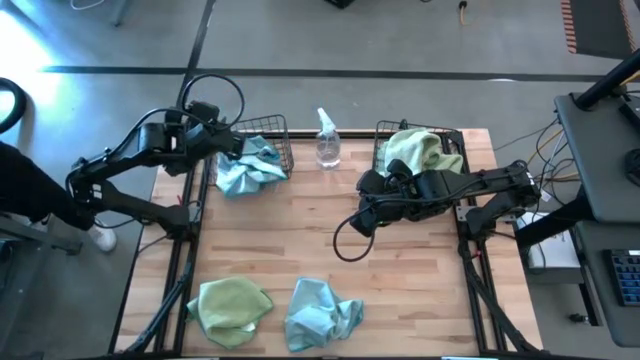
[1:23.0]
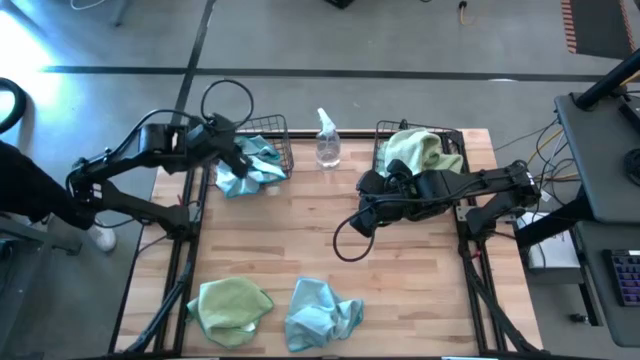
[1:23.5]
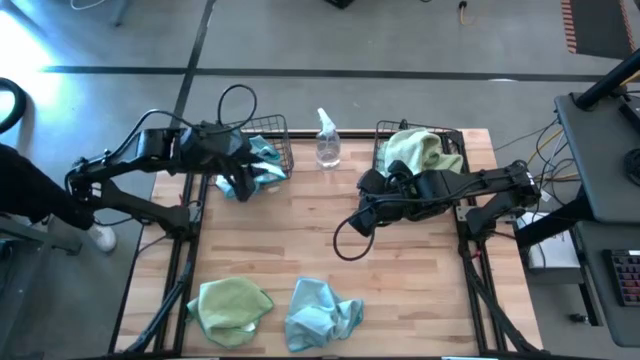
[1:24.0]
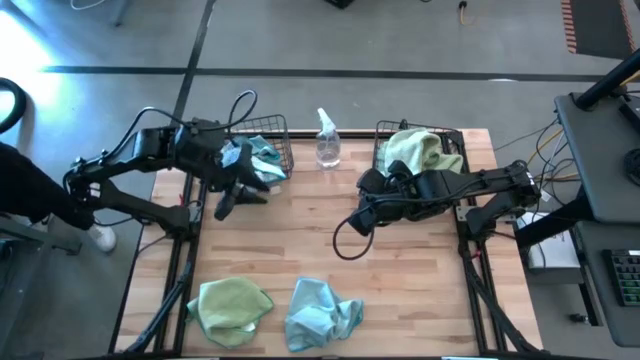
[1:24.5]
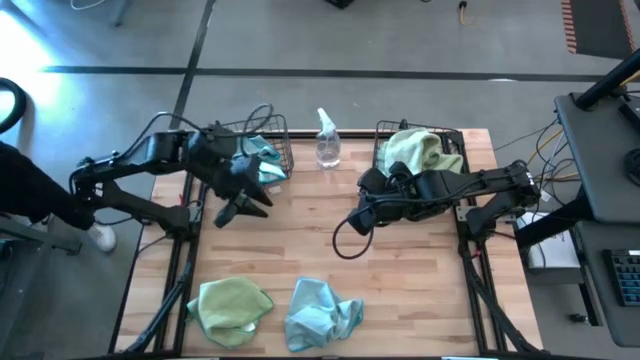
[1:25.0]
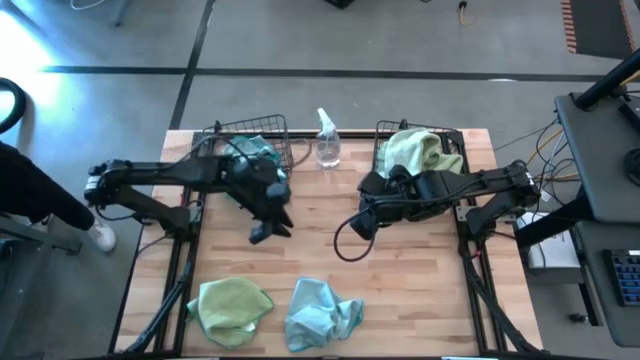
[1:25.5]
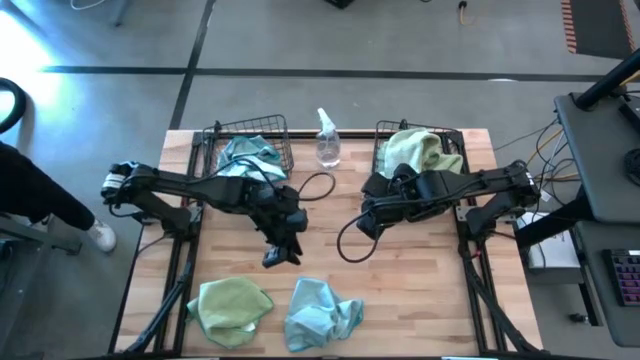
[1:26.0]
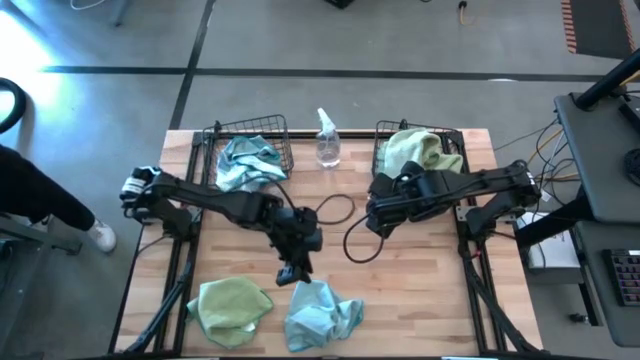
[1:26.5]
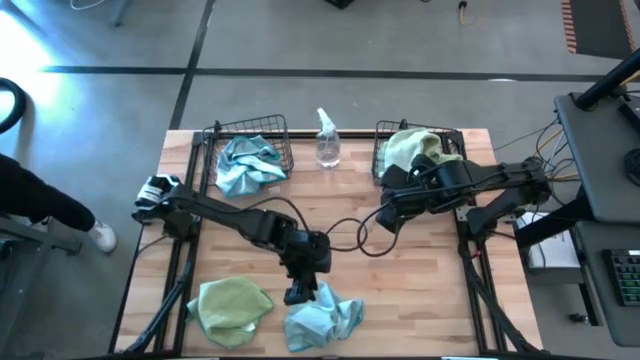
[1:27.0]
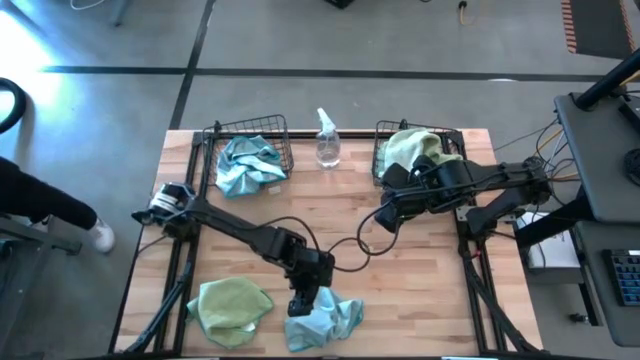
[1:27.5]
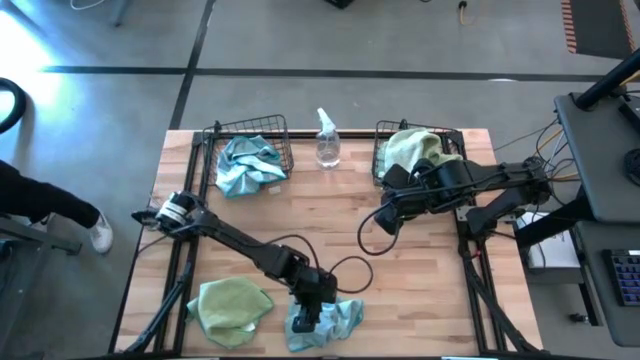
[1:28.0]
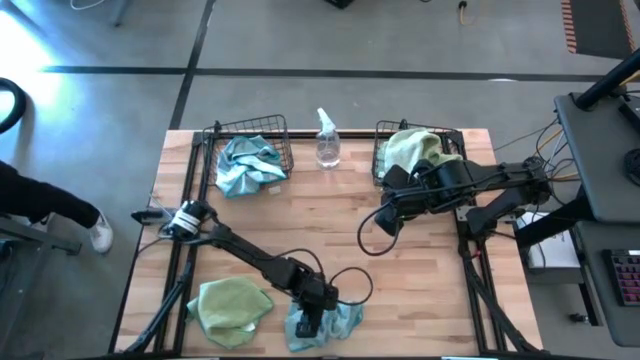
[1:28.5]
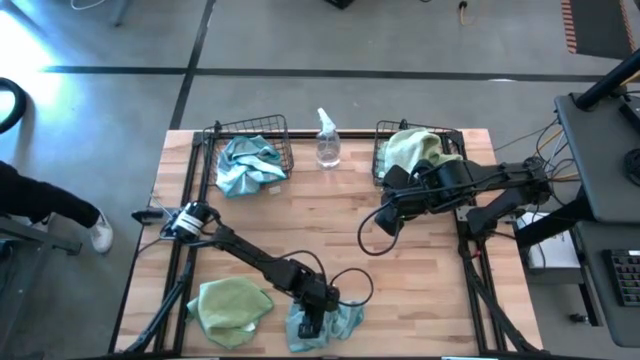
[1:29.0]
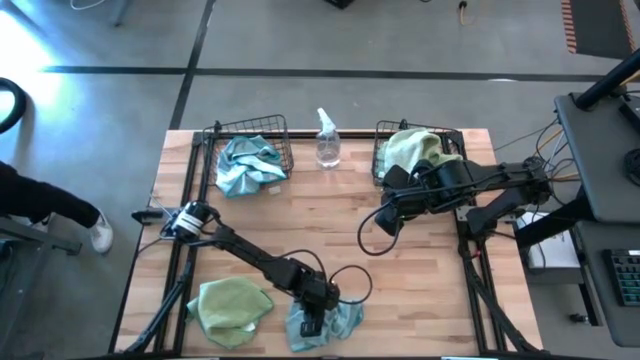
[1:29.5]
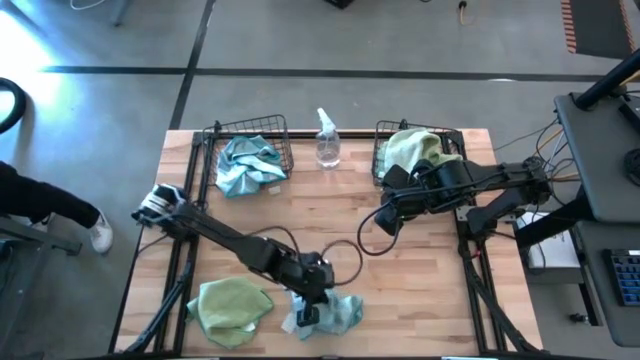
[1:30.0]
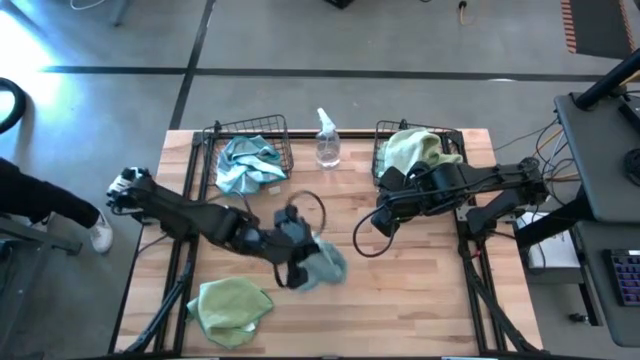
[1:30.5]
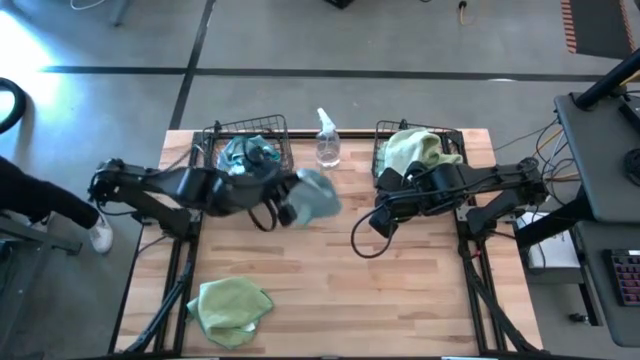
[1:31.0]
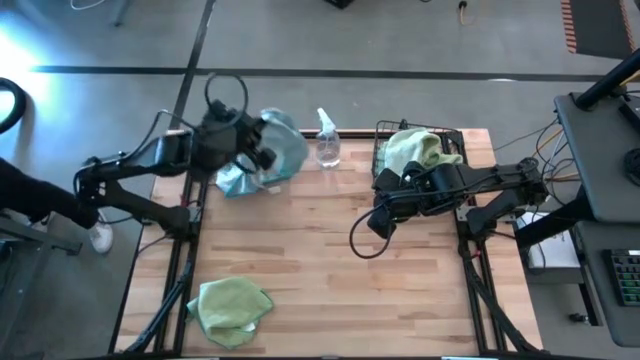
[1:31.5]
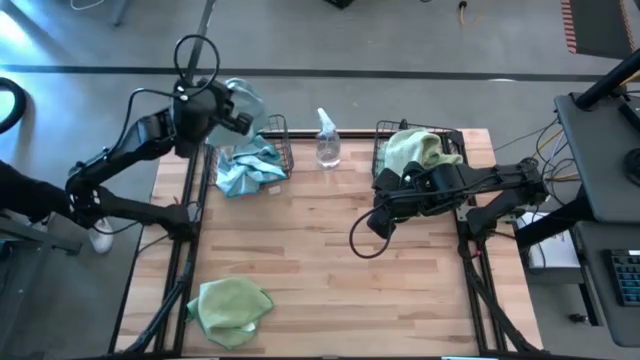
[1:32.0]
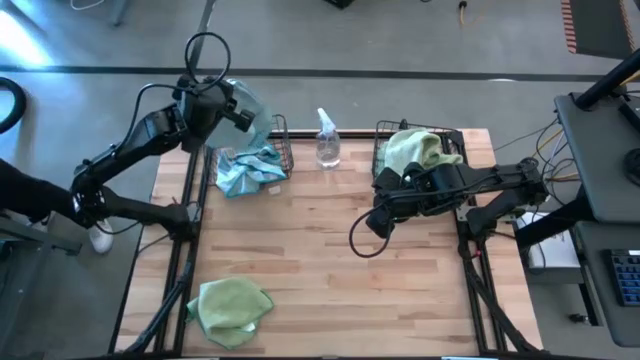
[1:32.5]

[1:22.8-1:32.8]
Task: Sort microfiber towel by color & place in baskets
Put the blue microfiber cloth into the left wire basket
